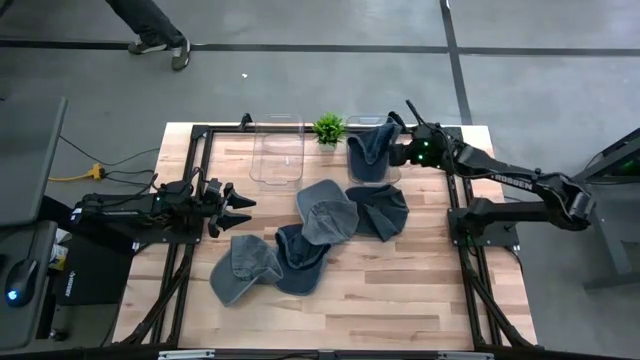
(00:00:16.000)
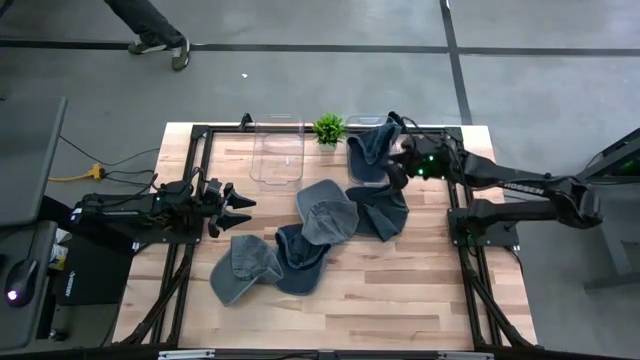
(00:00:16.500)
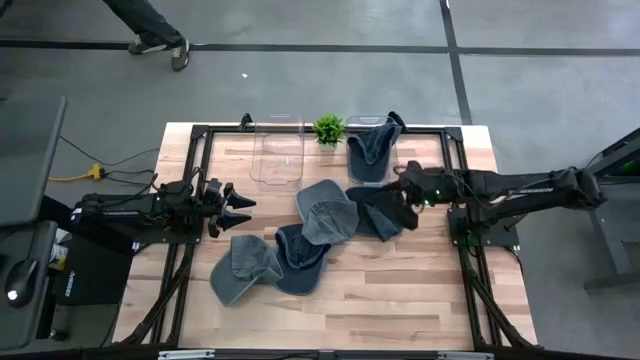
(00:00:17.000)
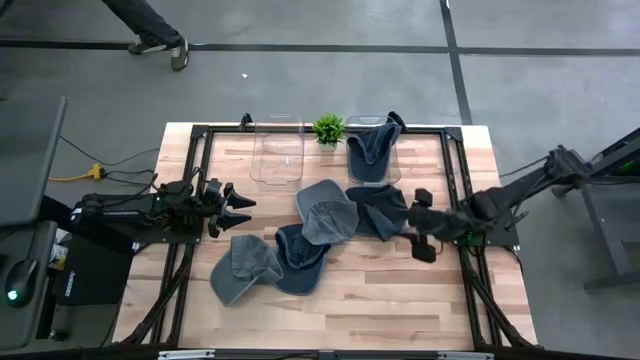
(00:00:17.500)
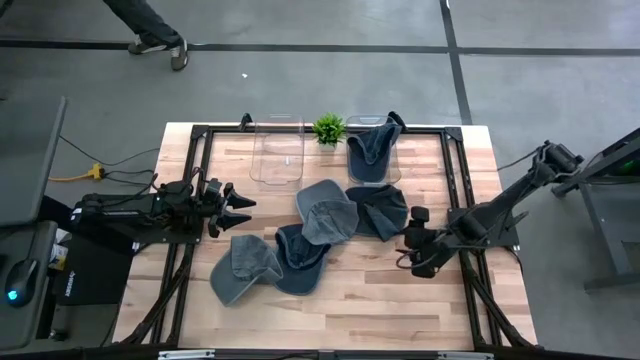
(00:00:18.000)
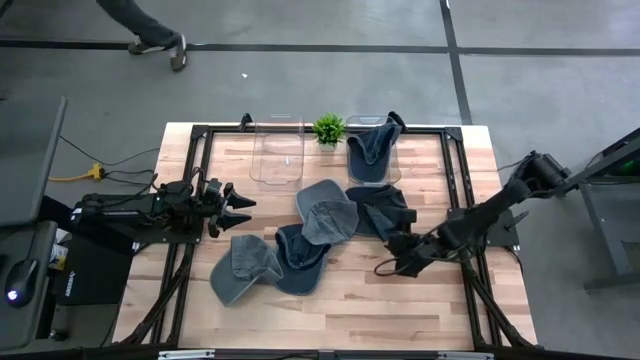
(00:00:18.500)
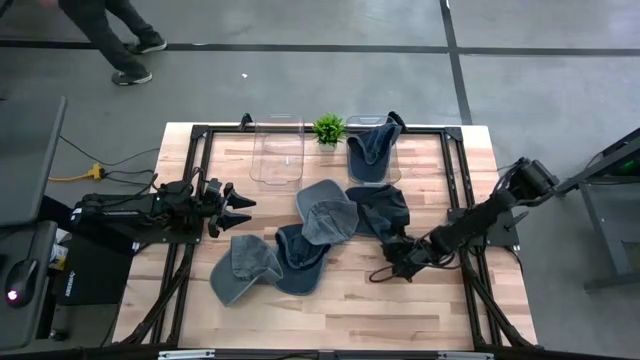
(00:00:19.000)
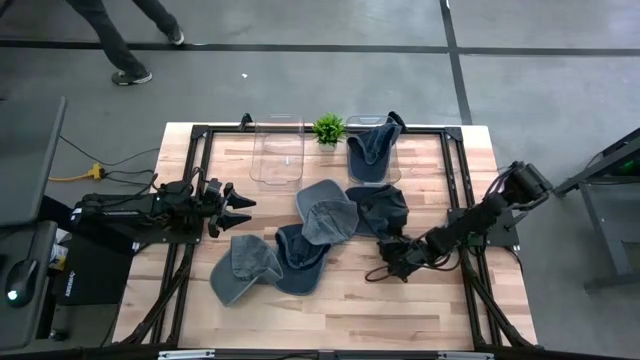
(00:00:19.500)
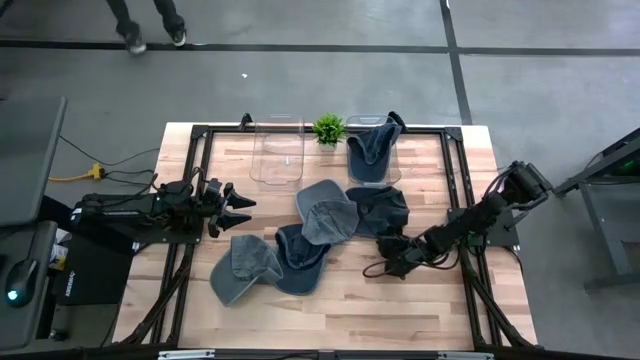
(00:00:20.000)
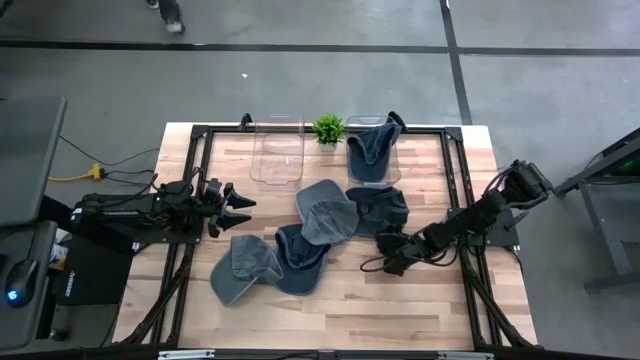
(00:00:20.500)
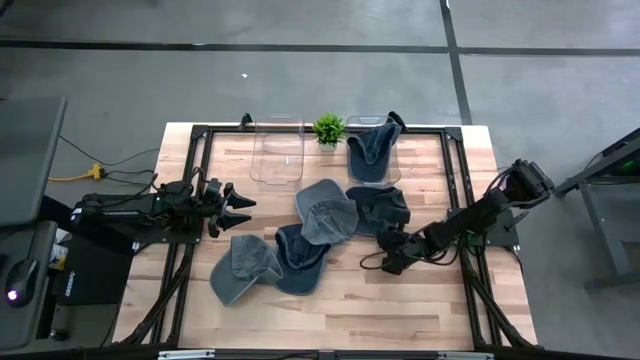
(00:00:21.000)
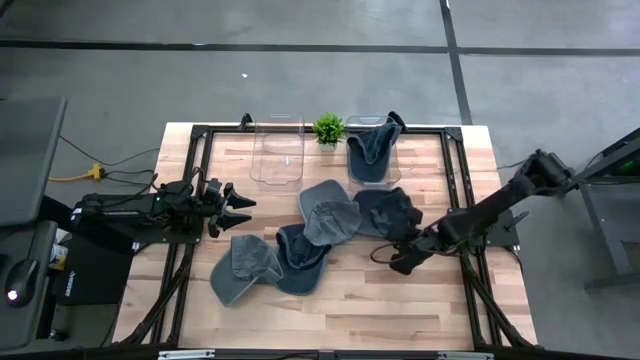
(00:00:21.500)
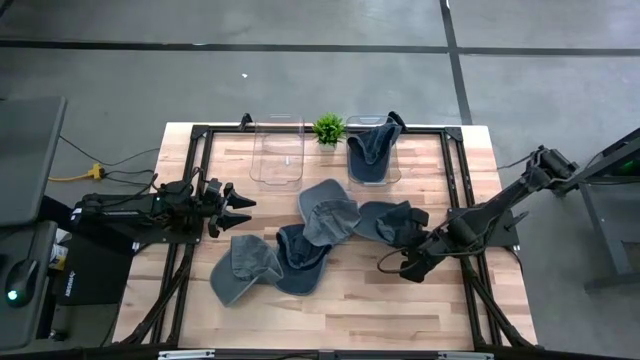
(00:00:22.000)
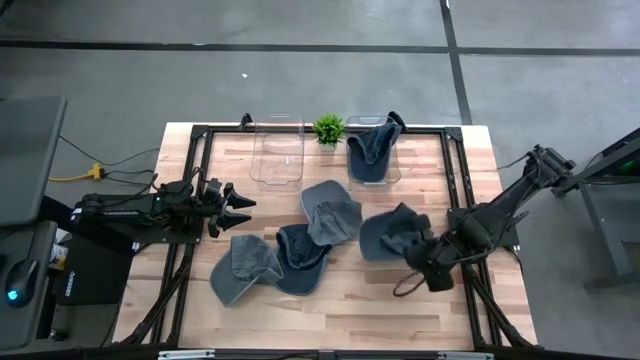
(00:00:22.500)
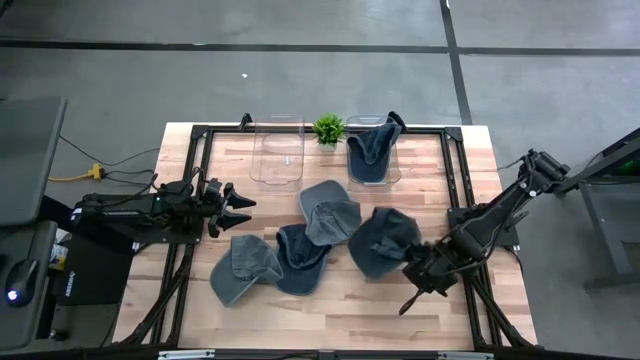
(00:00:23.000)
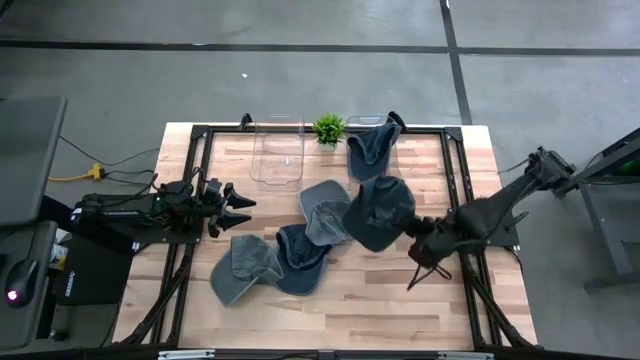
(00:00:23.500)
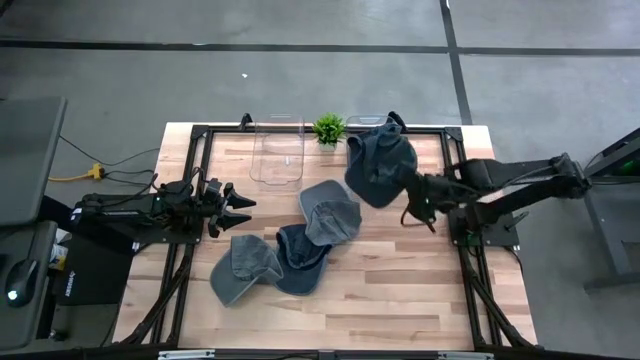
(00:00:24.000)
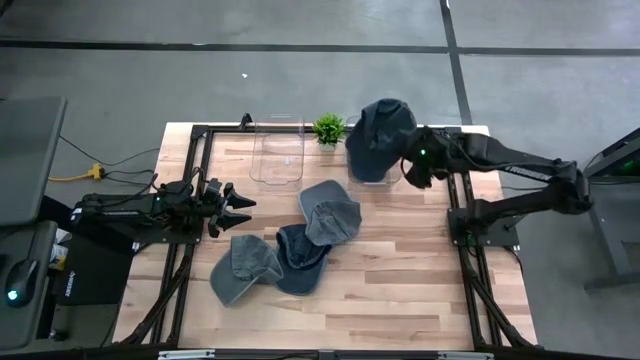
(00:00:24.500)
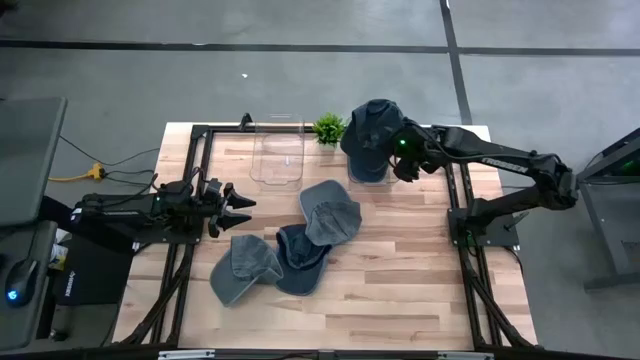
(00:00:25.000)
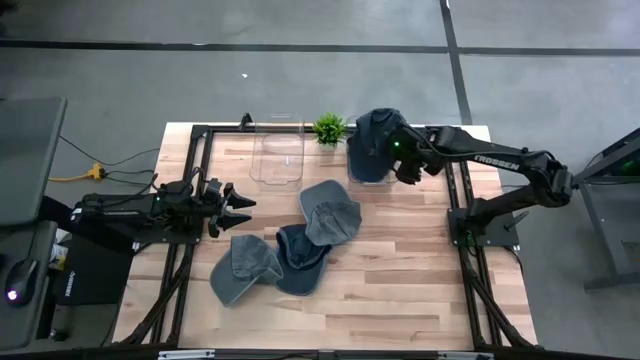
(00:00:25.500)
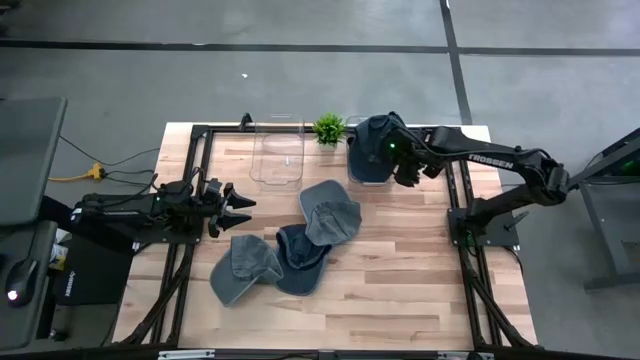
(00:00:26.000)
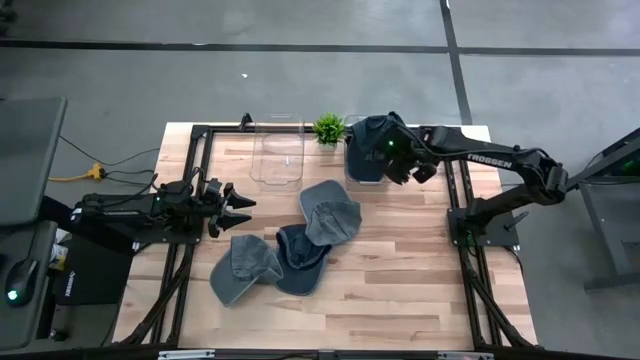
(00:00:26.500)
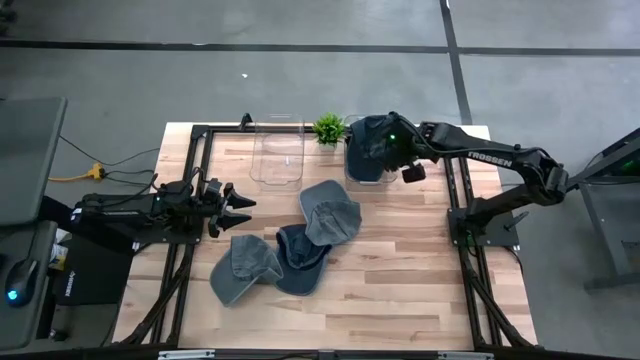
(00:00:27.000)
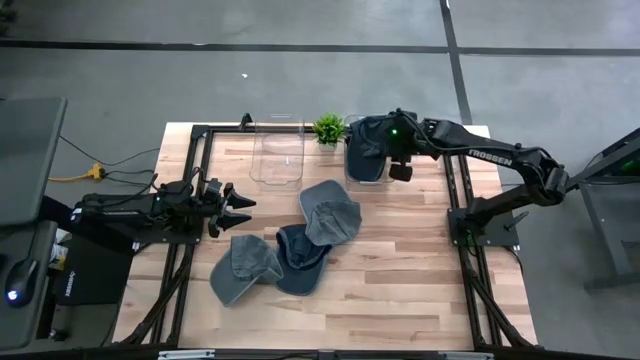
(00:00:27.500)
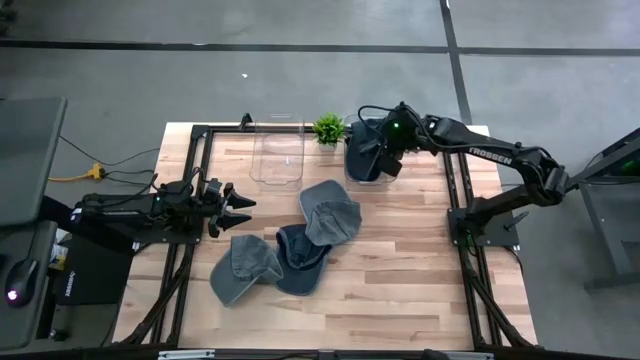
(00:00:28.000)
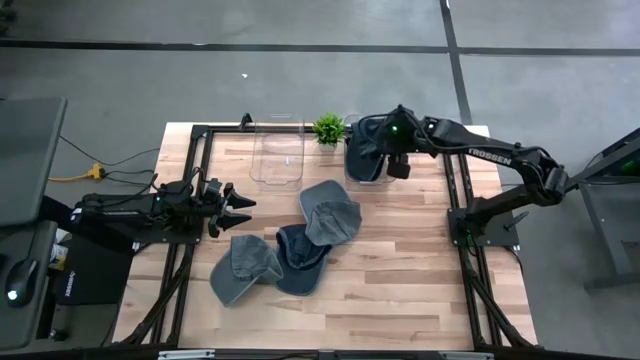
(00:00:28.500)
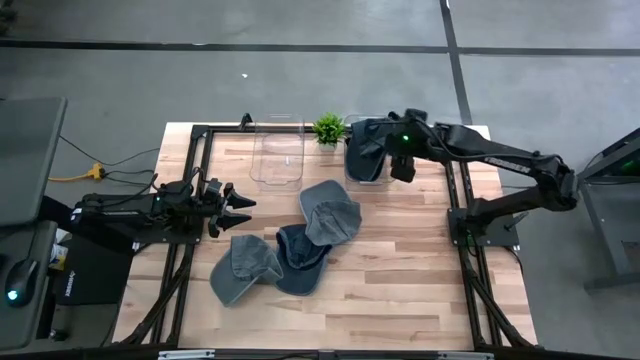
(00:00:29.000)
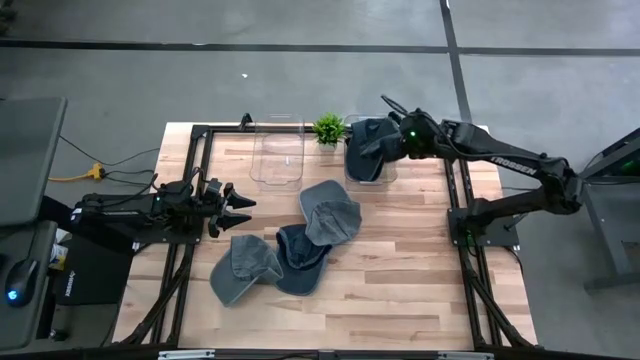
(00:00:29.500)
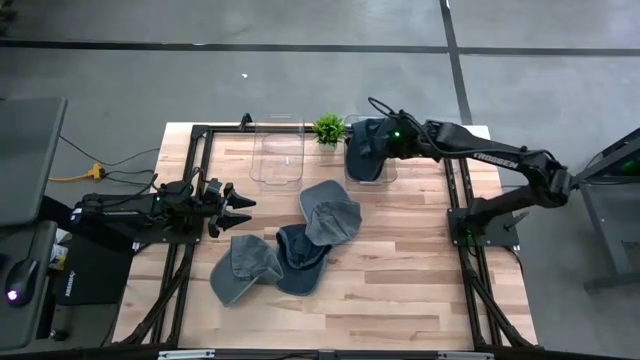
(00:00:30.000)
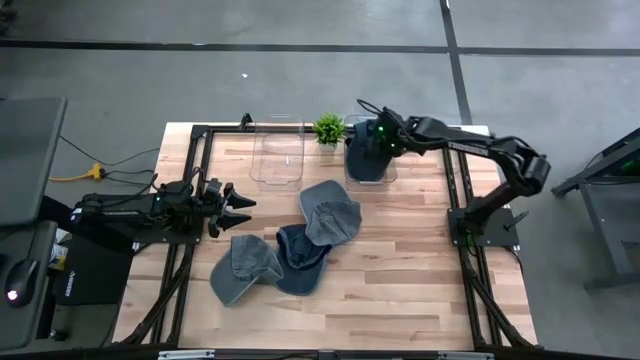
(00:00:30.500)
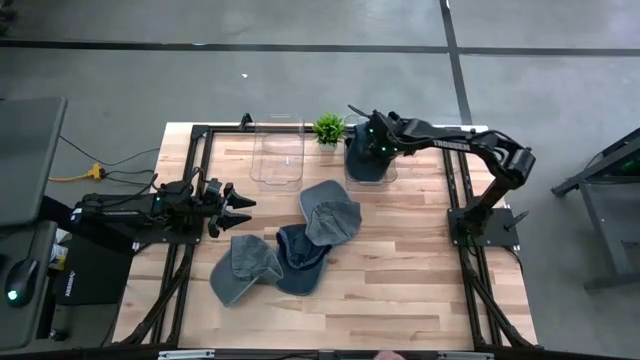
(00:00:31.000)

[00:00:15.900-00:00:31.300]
Task: Pick & Place hat
Put the right blue cap into the right transparent bin
